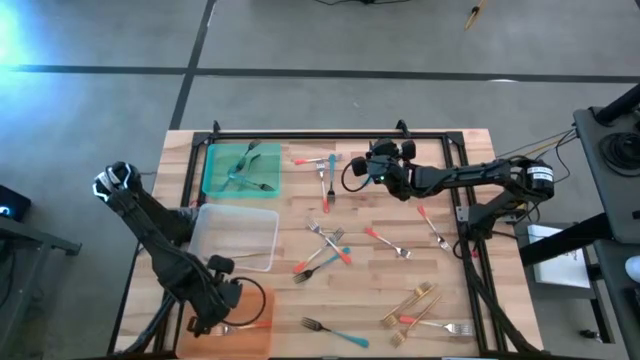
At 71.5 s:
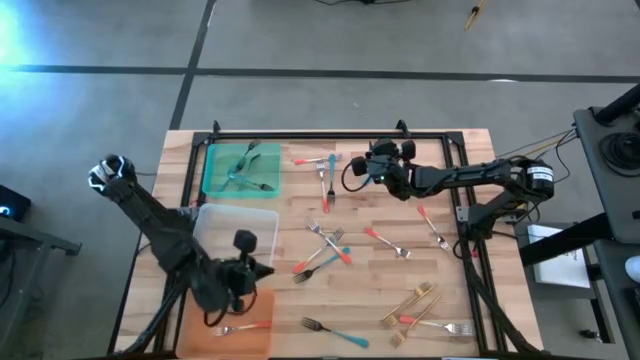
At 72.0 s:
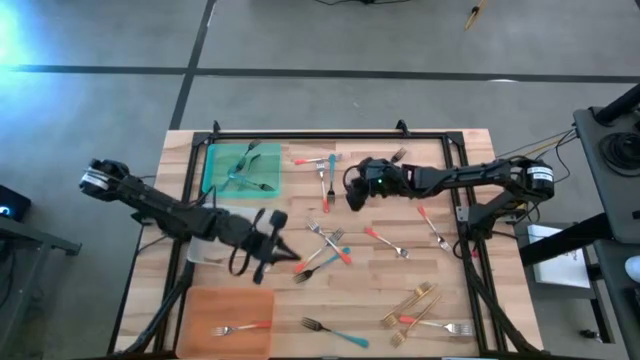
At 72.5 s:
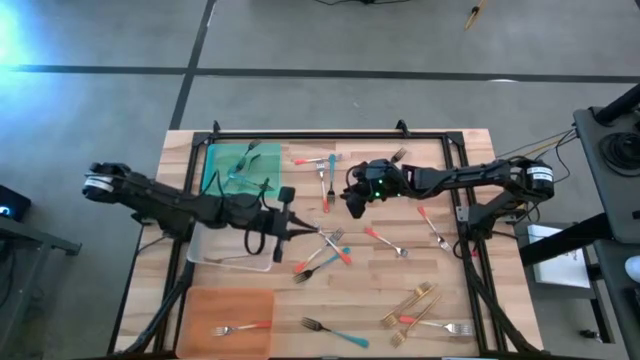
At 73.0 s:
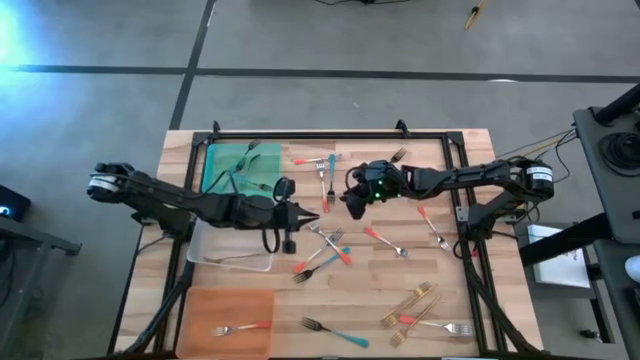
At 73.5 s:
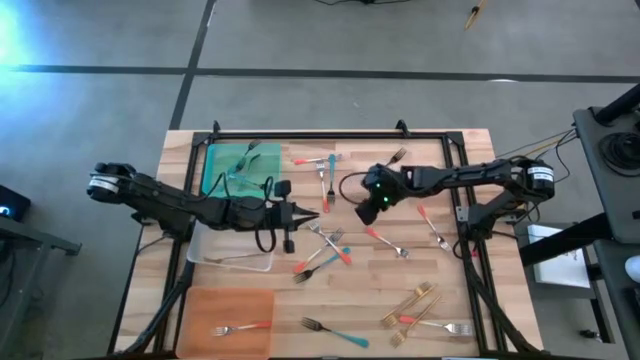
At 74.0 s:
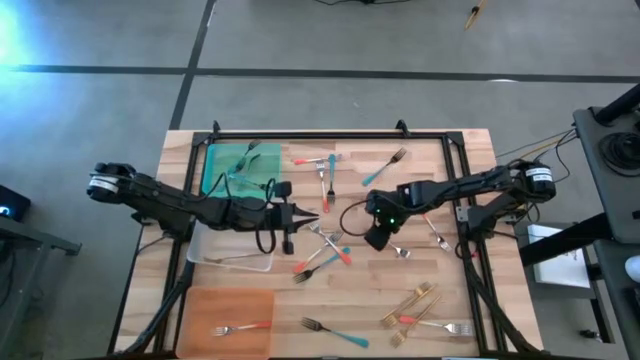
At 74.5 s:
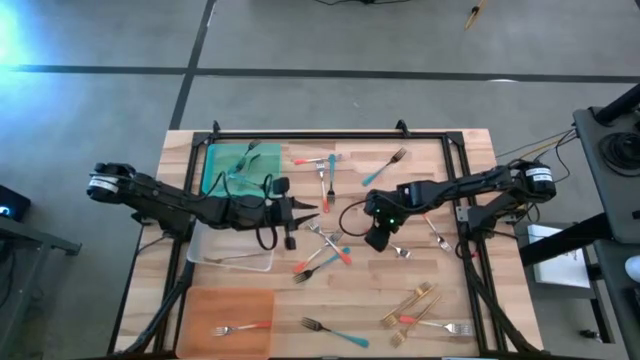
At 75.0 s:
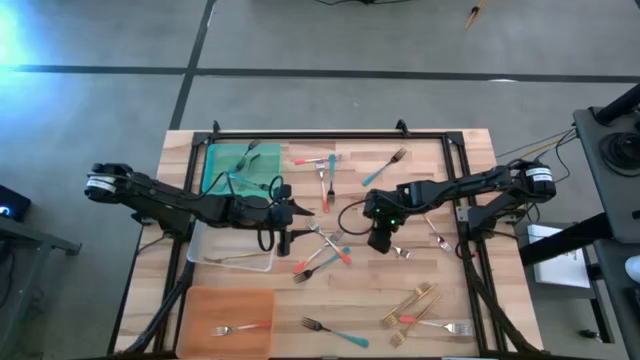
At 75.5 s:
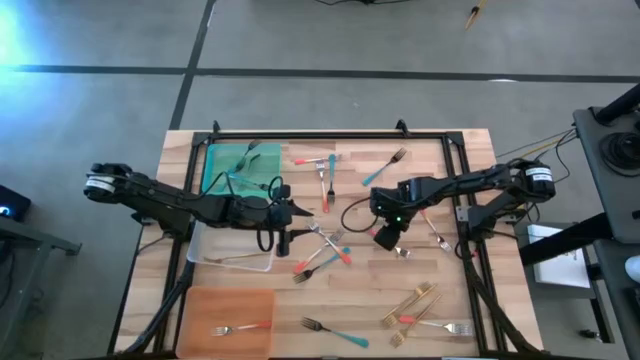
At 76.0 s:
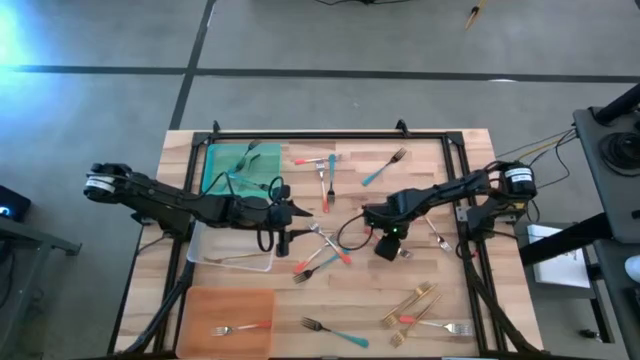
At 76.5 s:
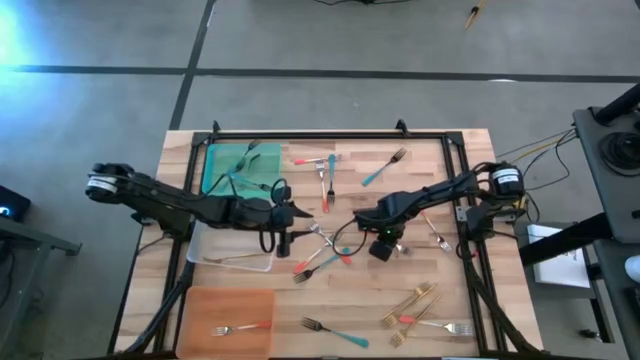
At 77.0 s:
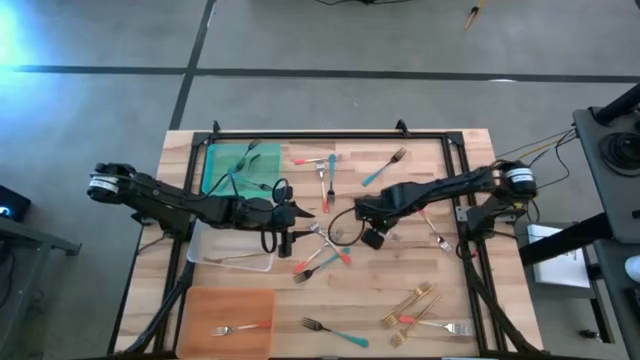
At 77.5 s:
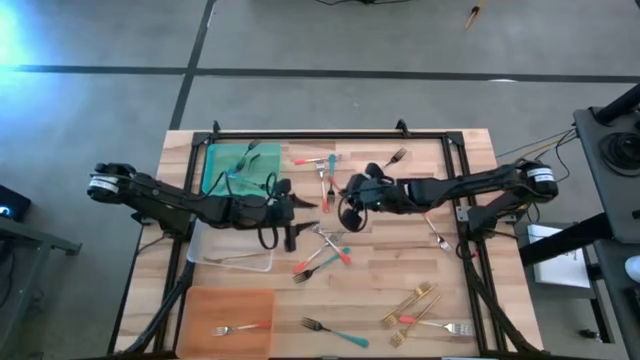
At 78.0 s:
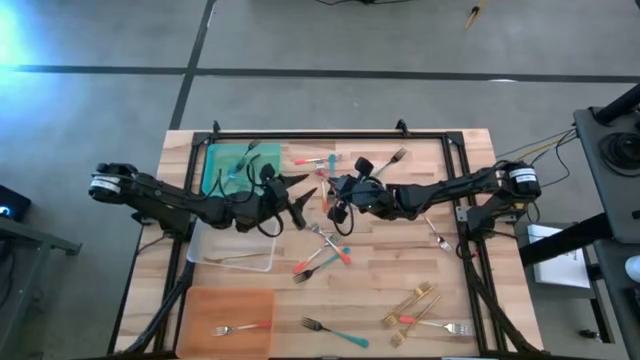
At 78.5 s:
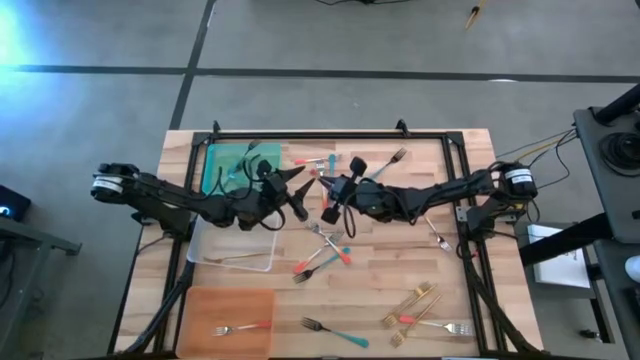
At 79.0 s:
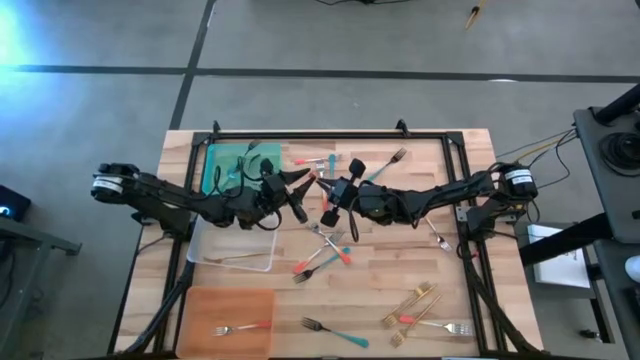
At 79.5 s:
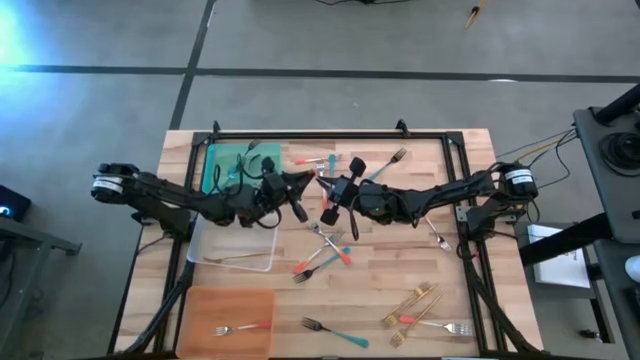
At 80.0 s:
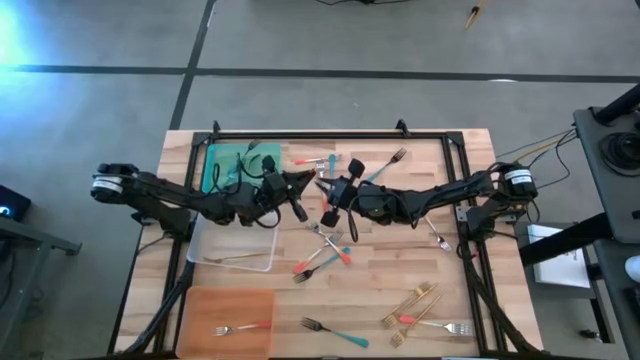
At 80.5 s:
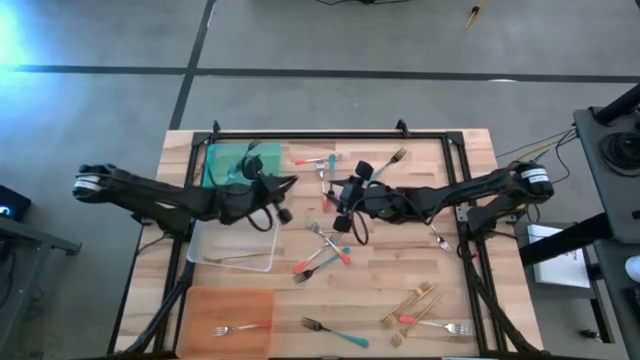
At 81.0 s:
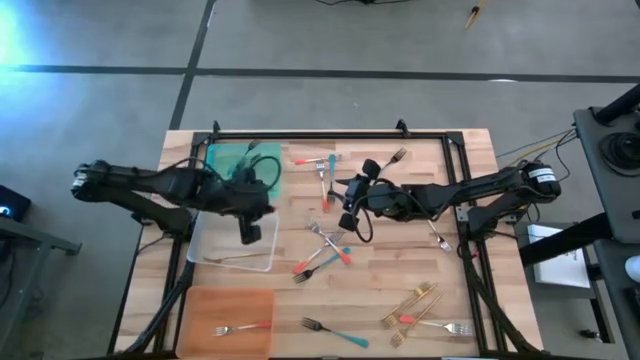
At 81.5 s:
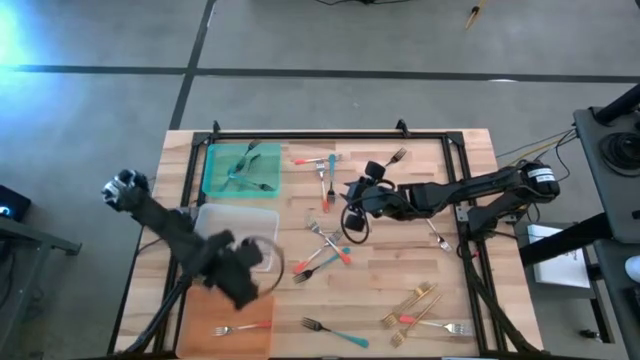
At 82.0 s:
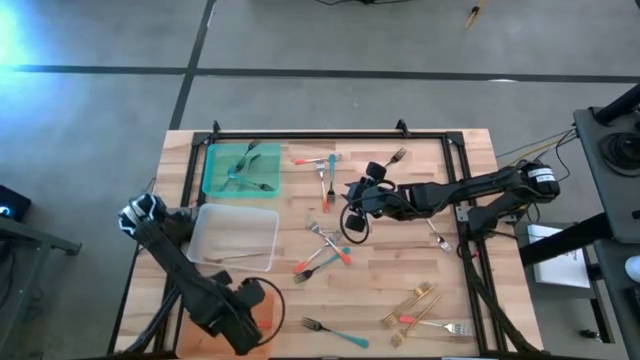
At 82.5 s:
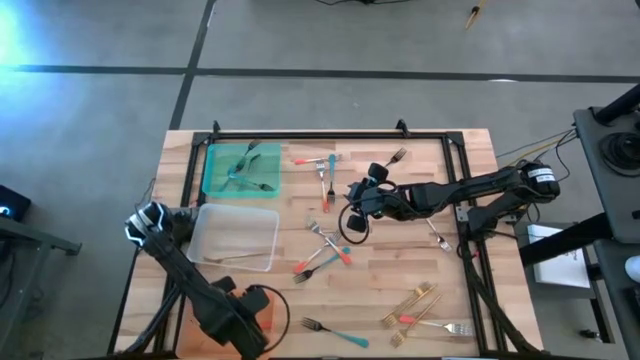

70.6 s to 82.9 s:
Task: Sort silverware by color (type)
Put the orange fork into the orange bin

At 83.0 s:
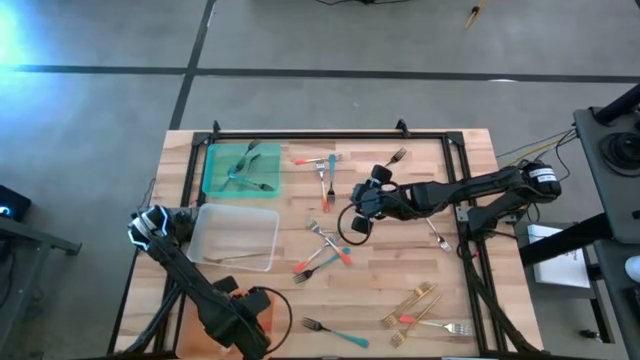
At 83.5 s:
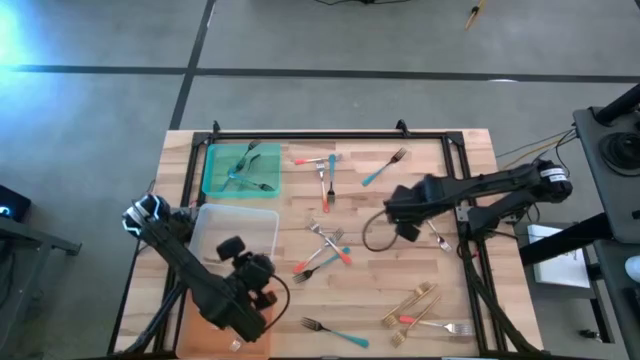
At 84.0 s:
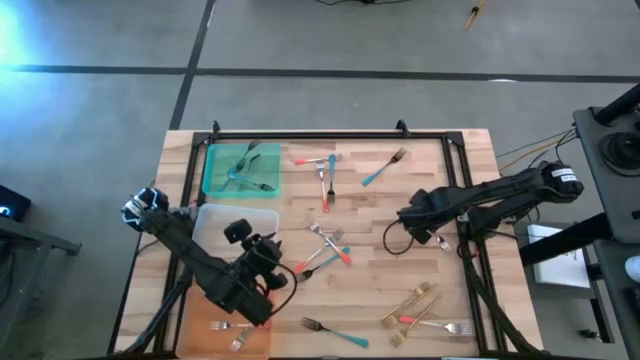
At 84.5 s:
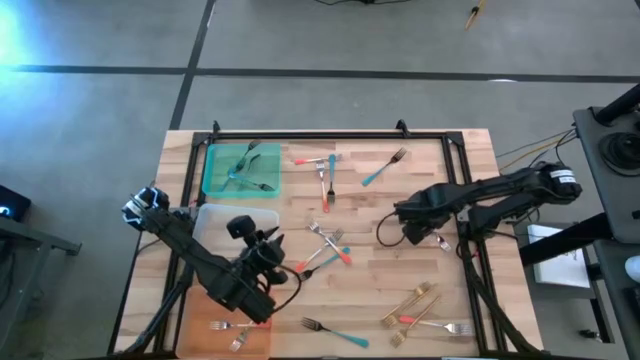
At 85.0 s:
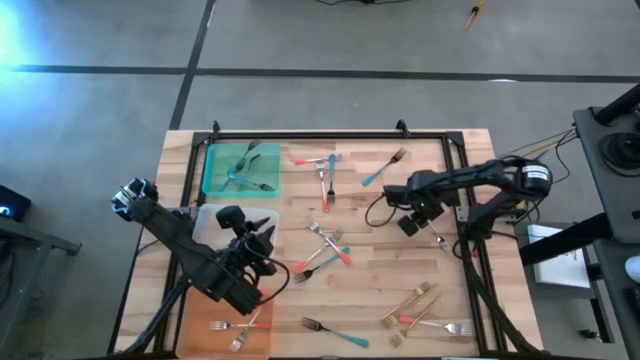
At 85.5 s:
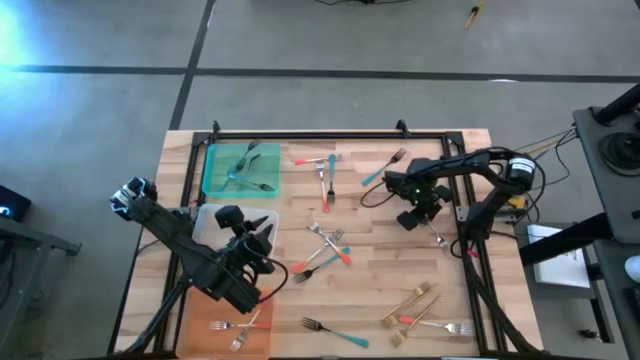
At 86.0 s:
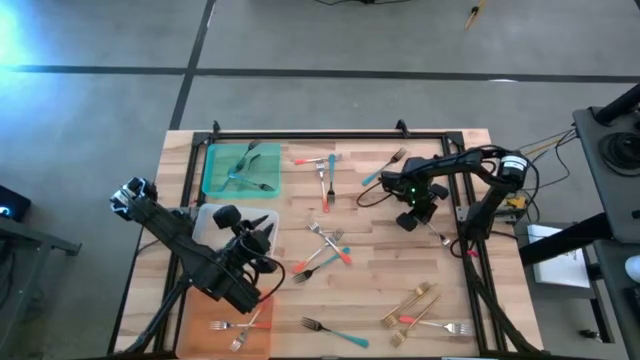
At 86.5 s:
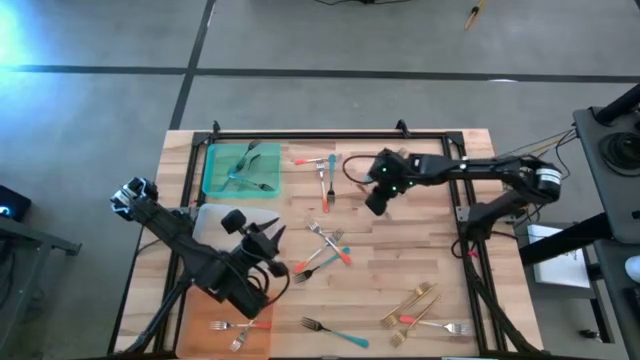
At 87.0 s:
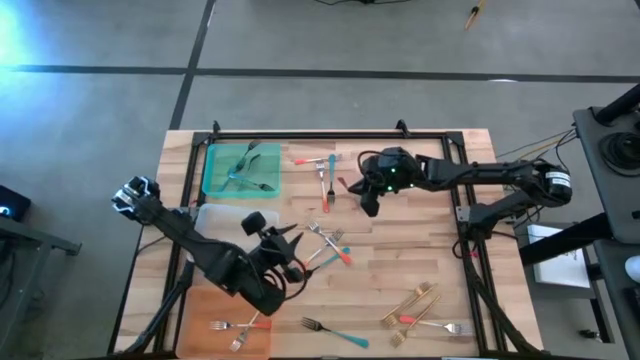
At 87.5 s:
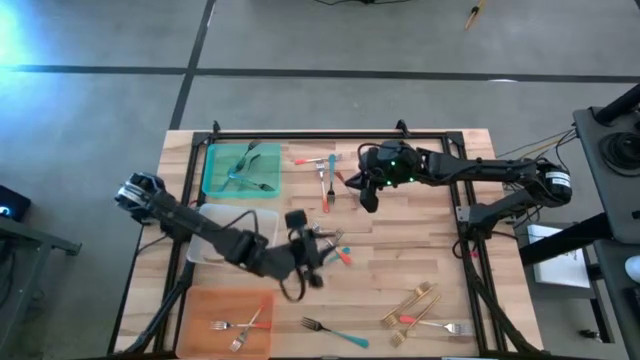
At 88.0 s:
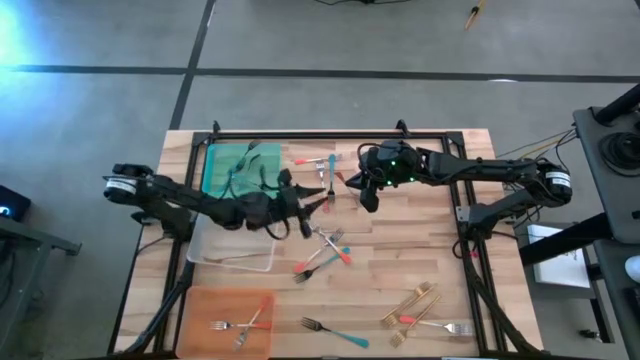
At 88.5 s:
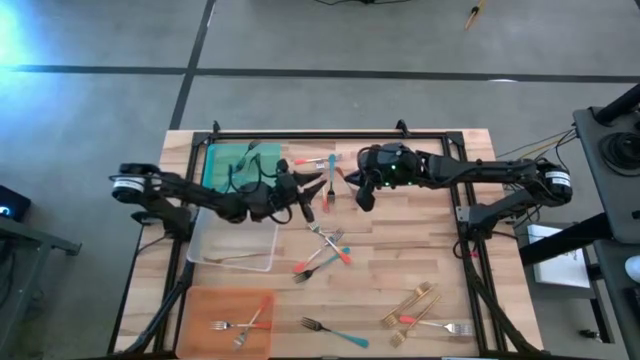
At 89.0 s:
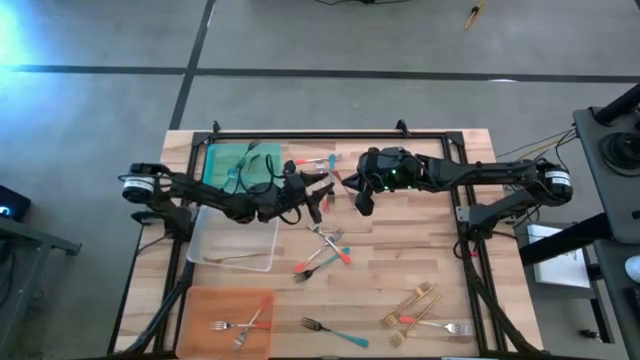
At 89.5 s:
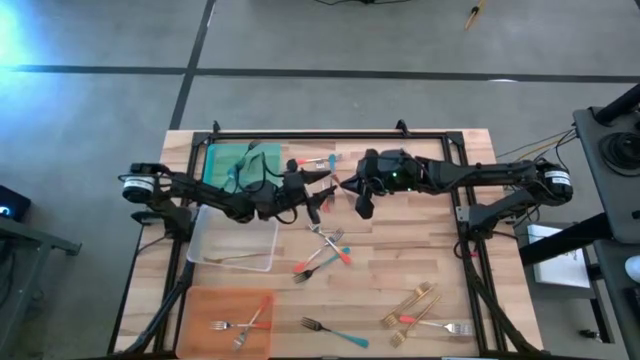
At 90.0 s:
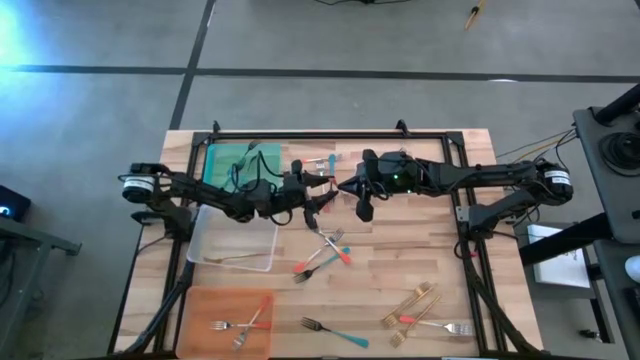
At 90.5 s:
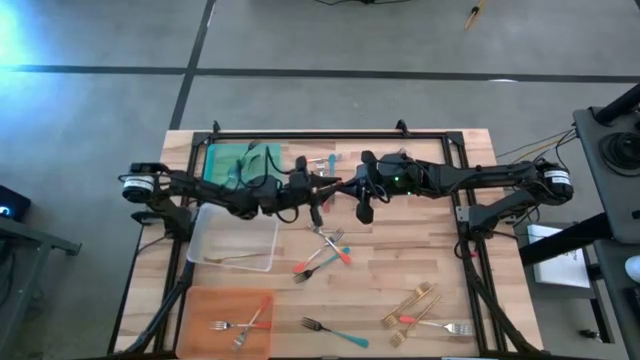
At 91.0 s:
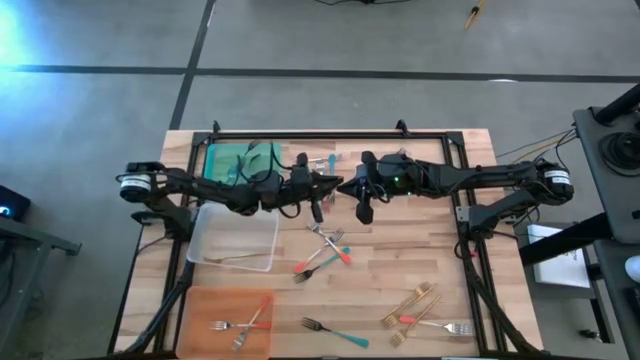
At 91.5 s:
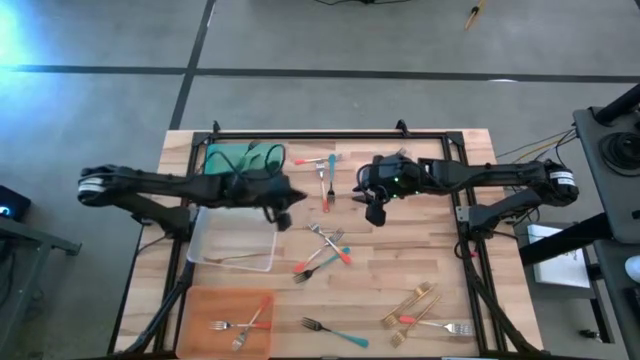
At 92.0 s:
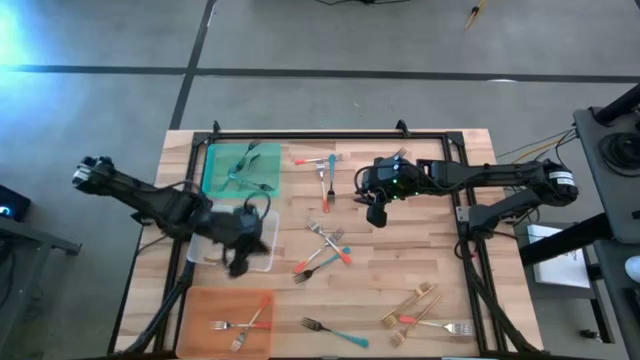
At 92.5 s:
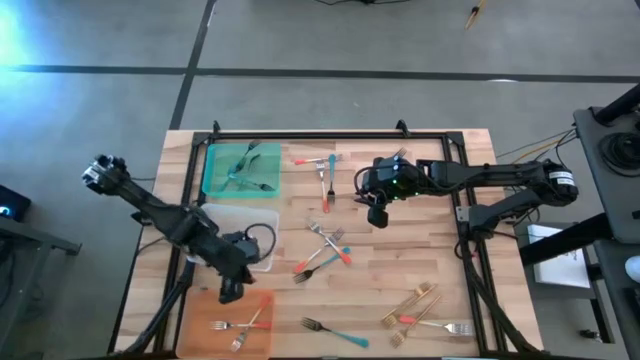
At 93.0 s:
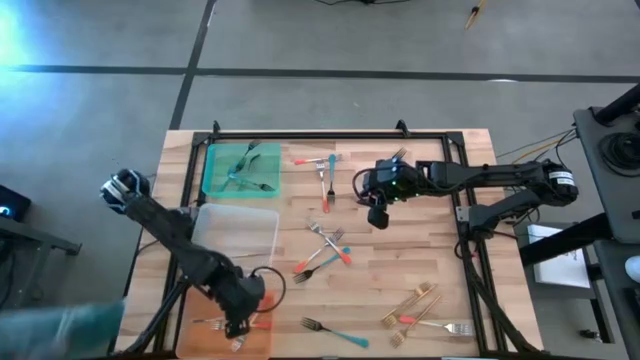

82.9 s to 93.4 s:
Put the orange fork into the orange bin
